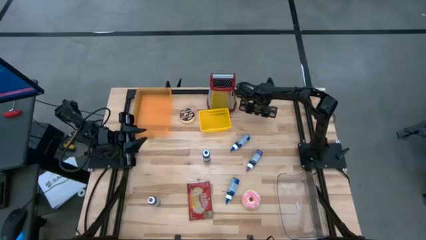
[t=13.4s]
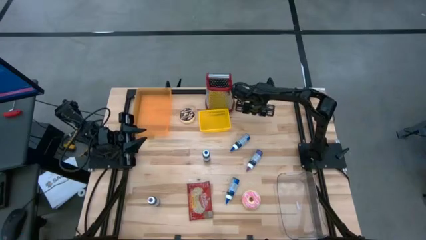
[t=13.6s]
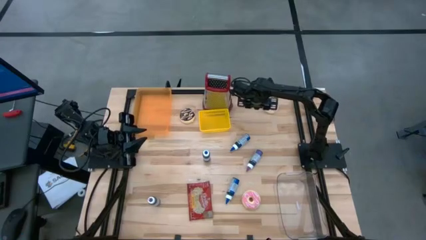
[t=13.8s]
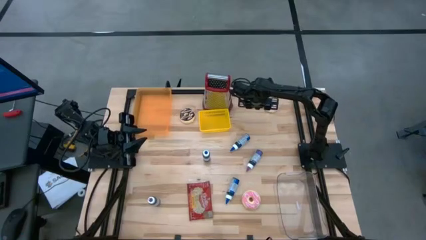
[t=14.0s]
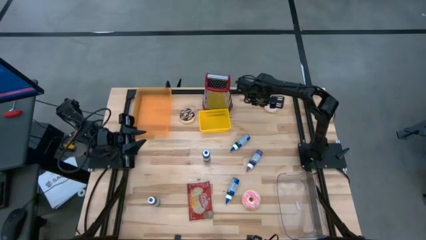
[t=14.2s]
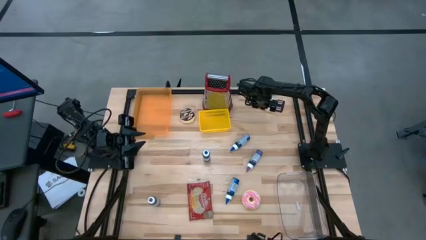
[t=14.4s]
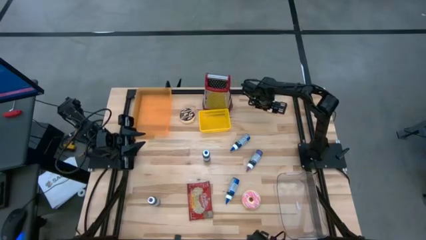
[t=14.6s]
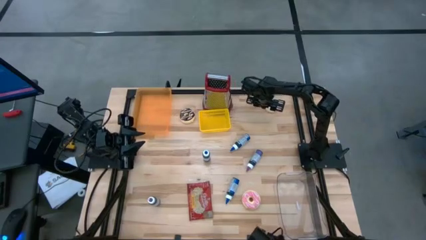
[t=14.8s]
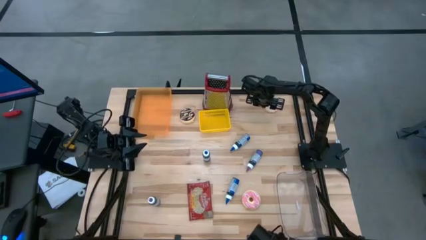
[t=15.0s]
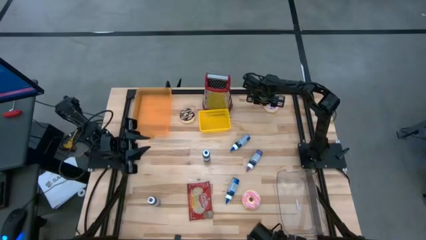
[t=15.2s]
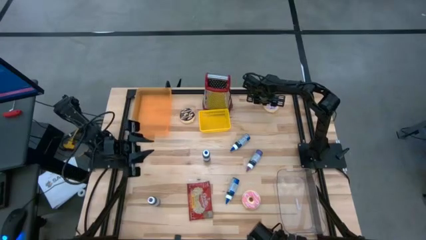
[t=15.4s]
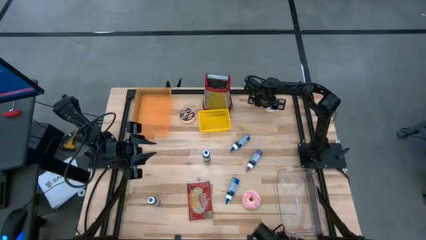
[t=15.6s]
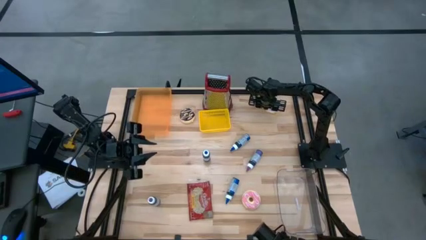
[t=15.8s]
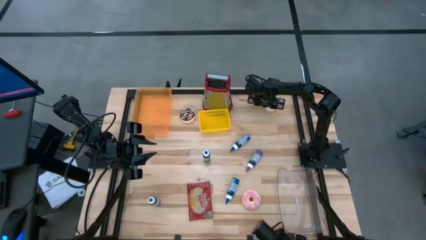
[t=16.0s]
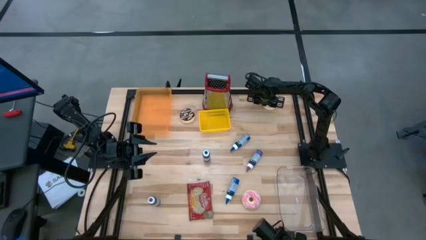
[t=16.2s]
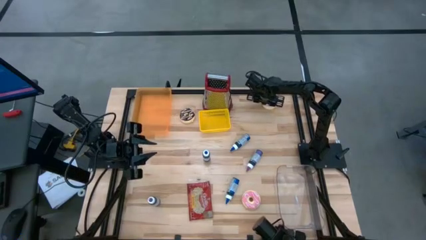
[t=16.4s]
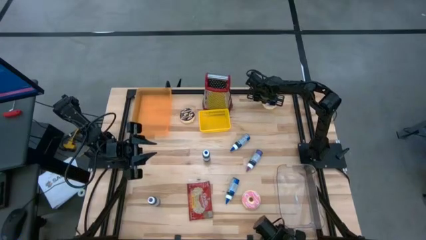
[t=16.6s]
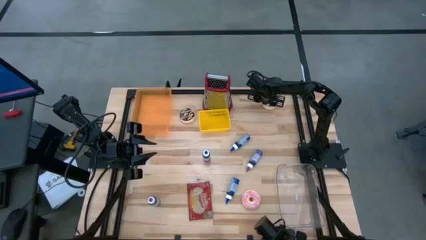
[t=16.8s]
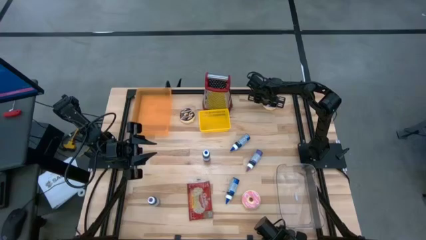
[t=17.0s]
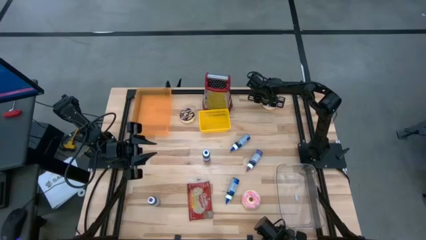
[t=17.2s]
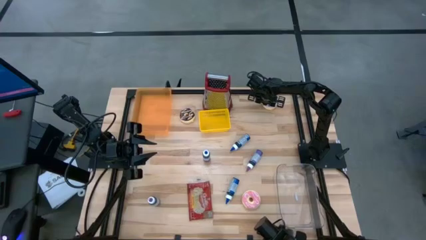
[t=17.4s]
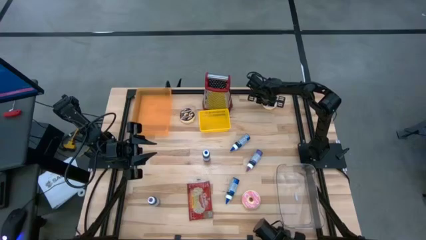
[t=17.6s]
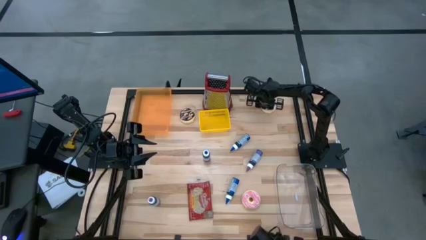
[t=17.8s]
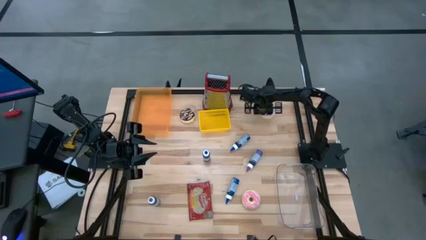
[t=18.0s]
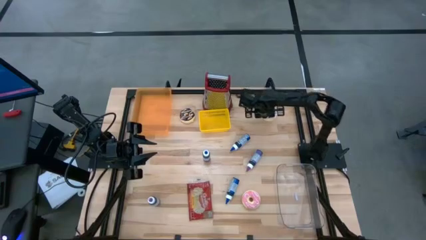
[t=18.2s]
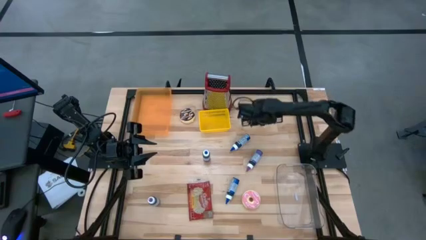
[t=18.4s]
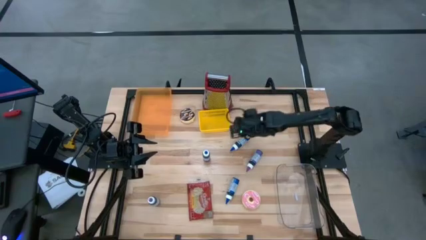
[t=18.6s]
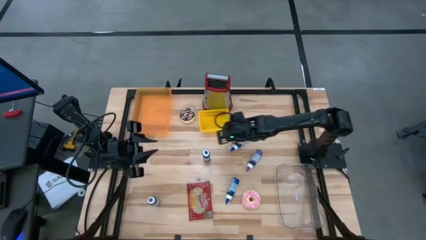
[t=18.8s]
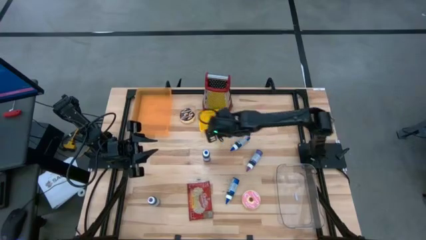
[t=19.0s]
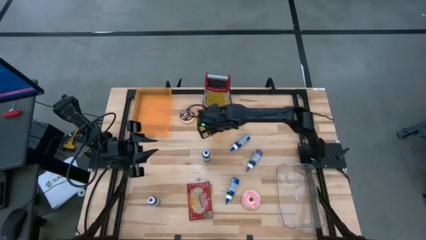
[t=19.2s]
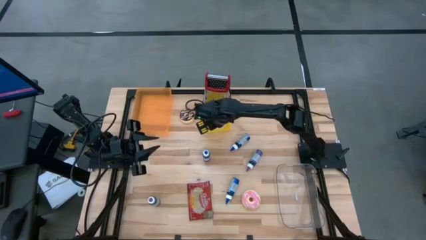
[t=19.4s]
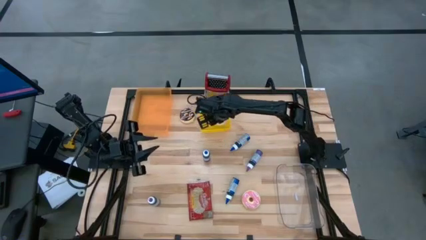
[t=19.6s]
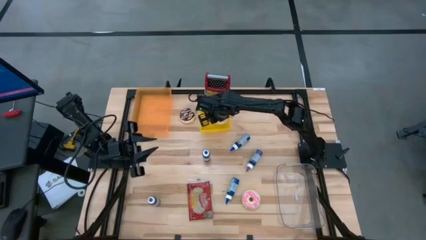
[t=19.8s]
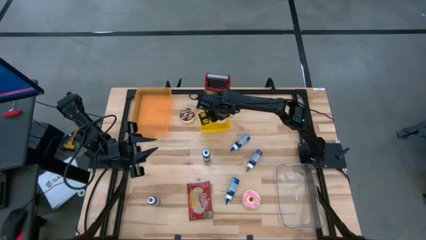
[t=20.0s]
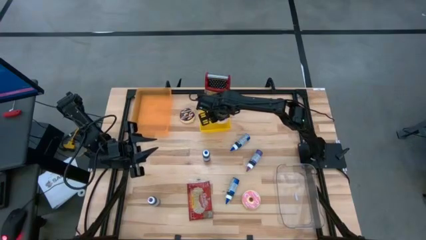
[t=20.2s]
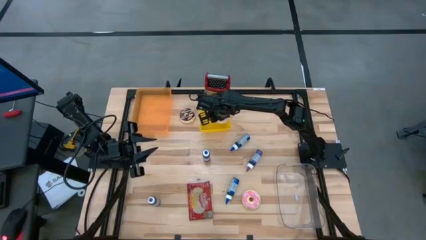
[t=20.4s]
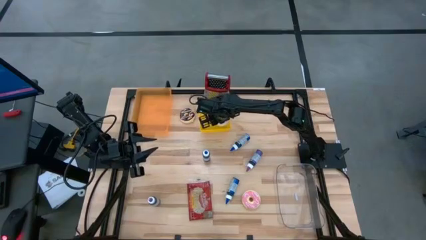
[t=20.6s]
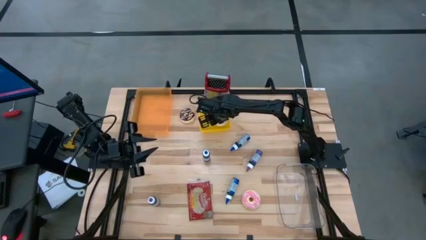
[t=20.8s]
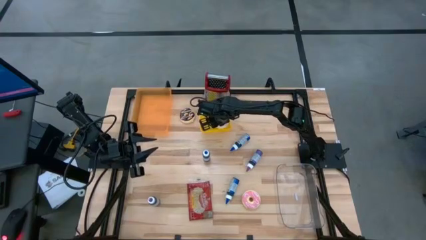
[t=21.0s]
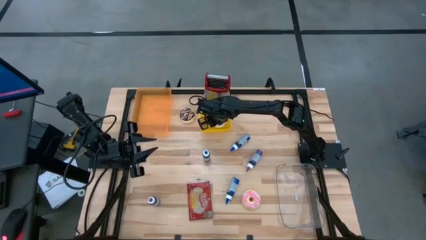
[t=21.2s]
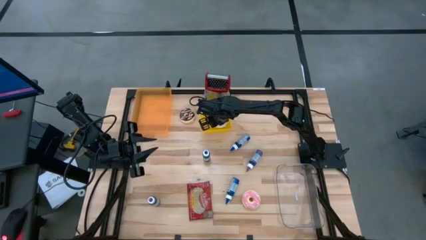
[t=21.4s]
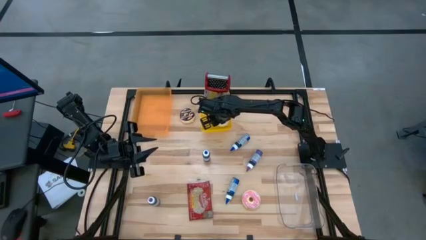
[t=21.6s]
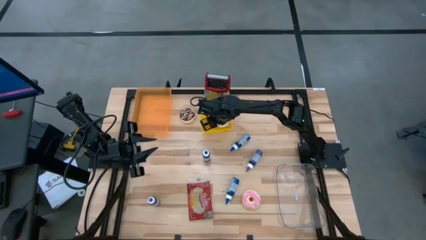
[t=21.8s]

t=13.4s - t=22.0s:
Put the purple donut into the yellow bin
